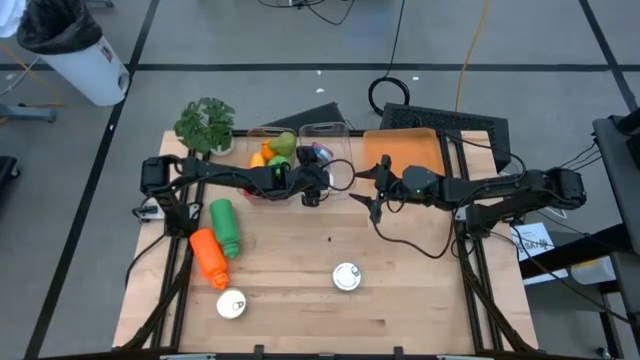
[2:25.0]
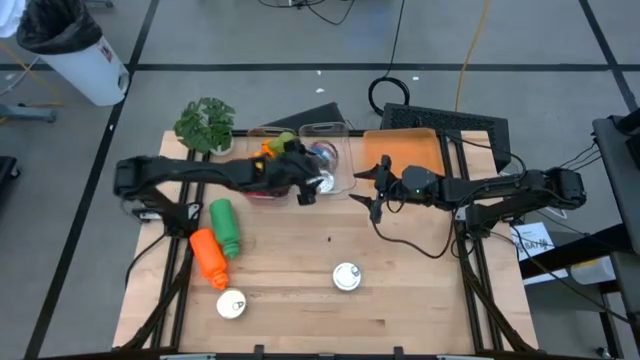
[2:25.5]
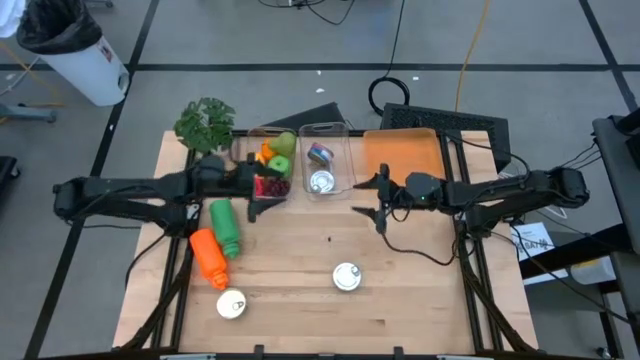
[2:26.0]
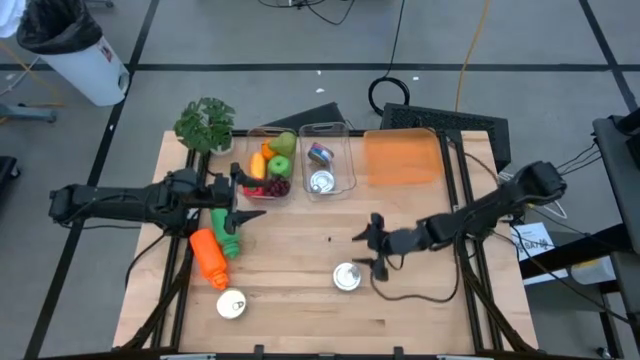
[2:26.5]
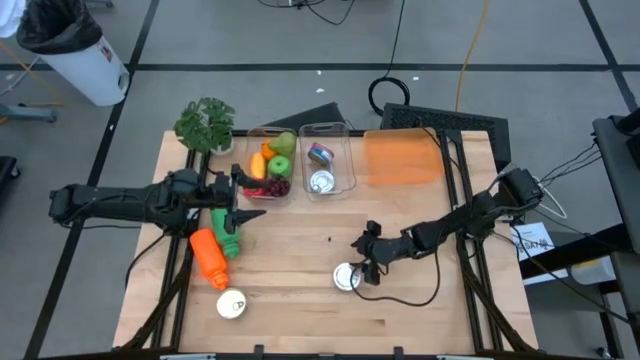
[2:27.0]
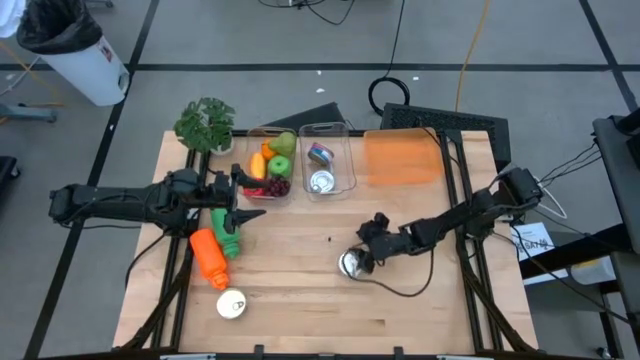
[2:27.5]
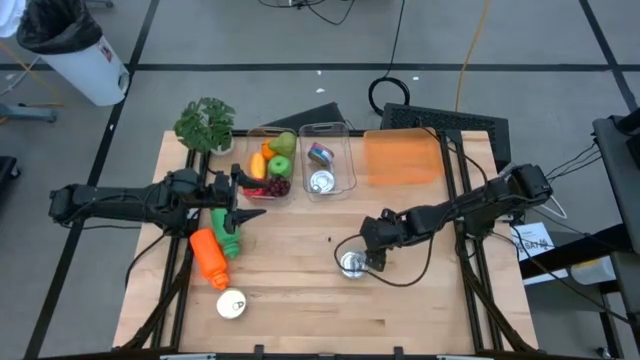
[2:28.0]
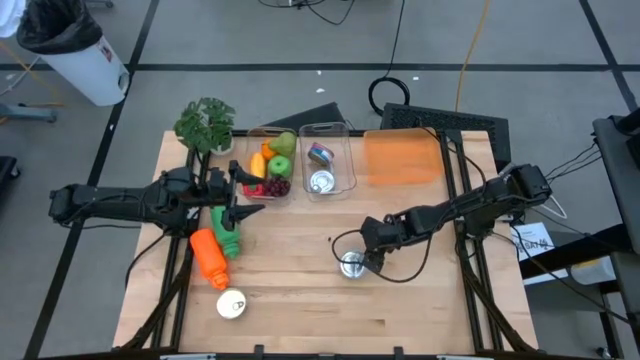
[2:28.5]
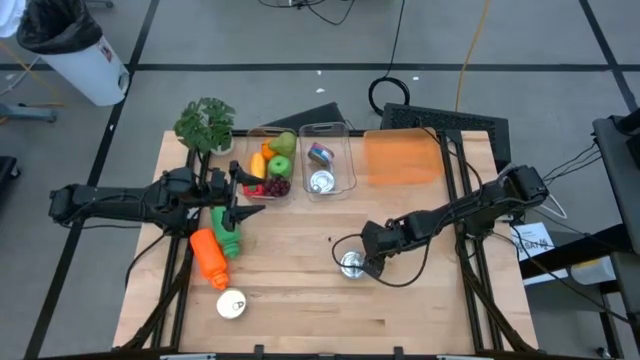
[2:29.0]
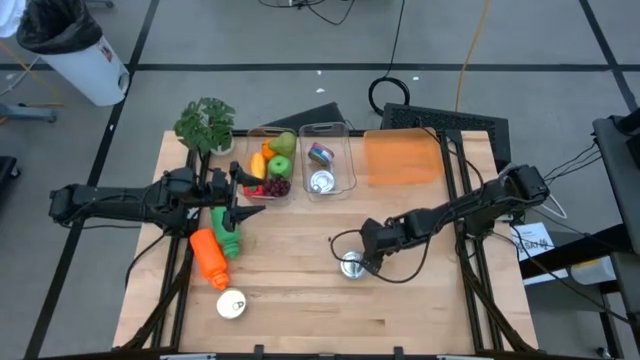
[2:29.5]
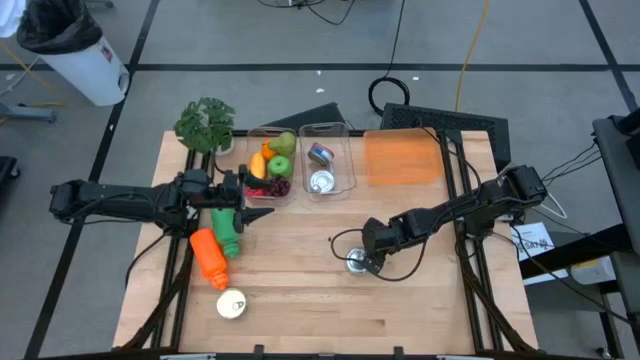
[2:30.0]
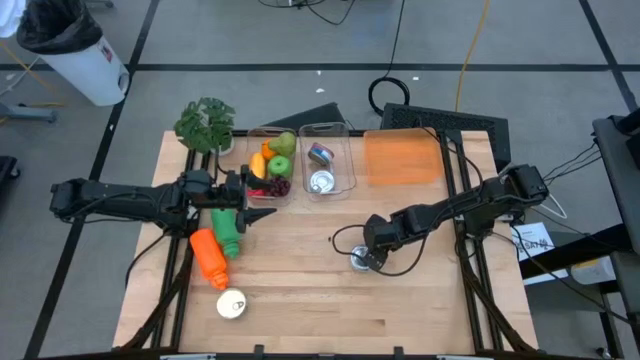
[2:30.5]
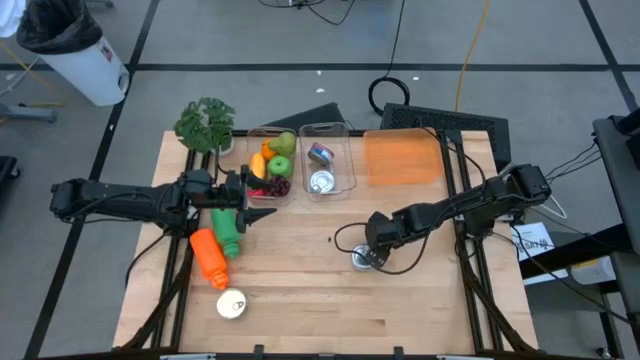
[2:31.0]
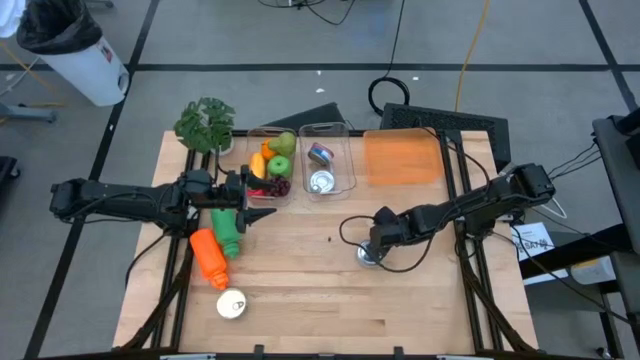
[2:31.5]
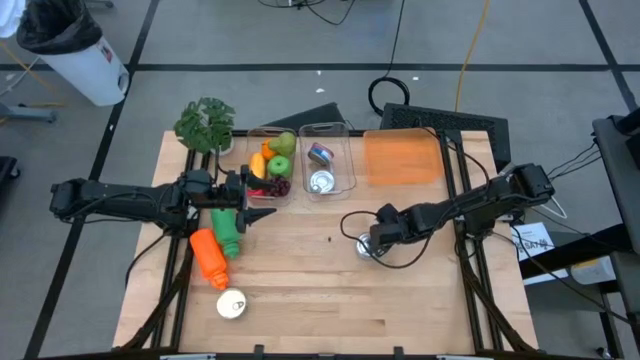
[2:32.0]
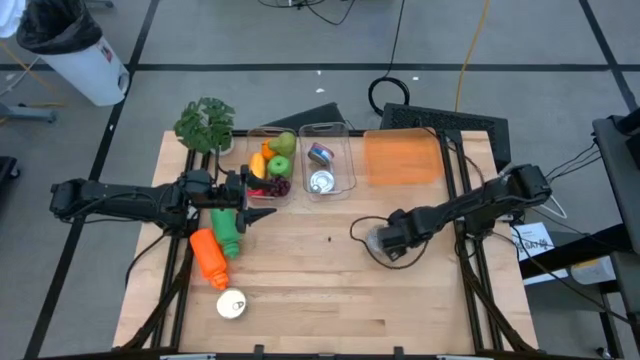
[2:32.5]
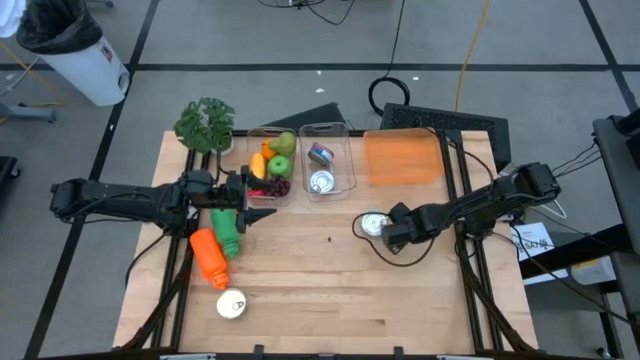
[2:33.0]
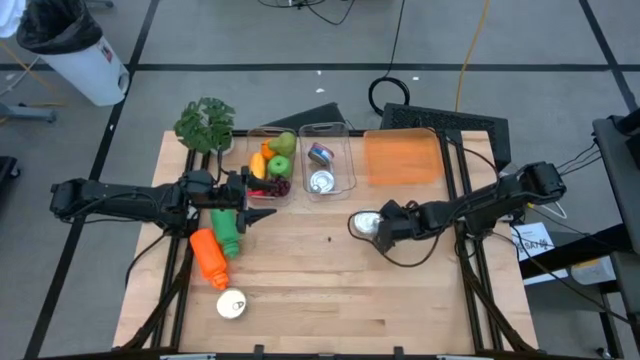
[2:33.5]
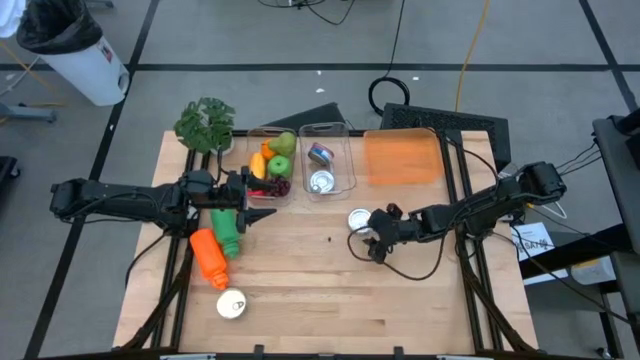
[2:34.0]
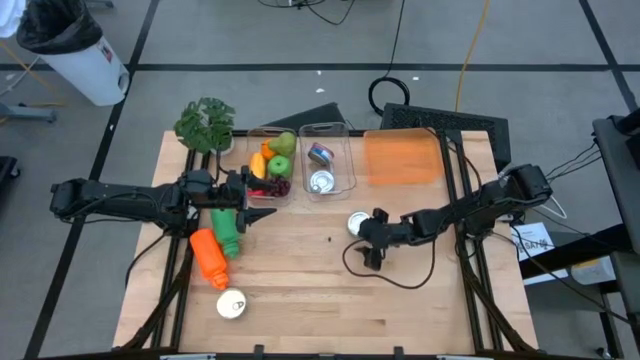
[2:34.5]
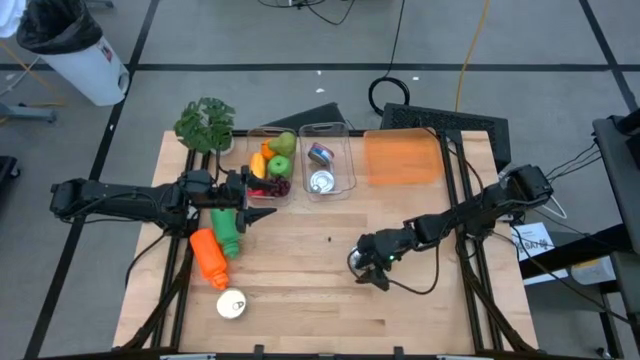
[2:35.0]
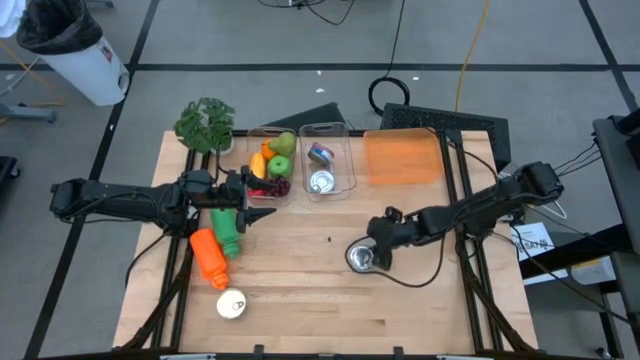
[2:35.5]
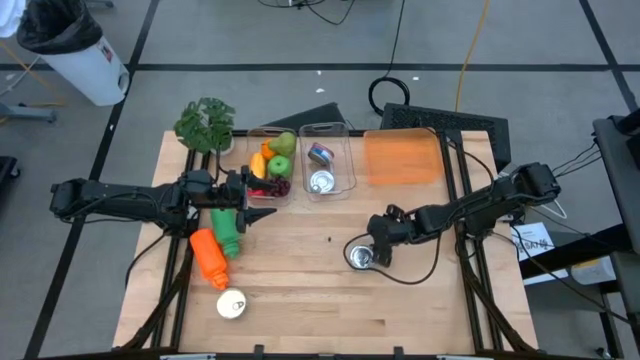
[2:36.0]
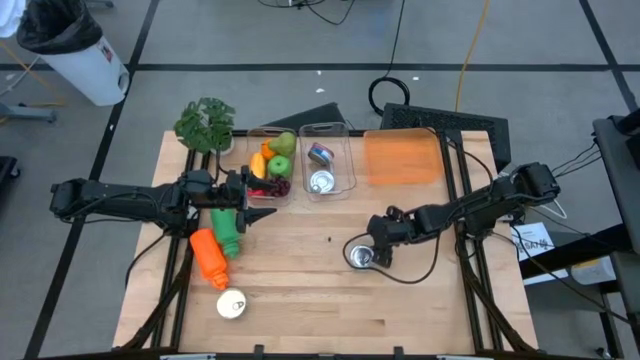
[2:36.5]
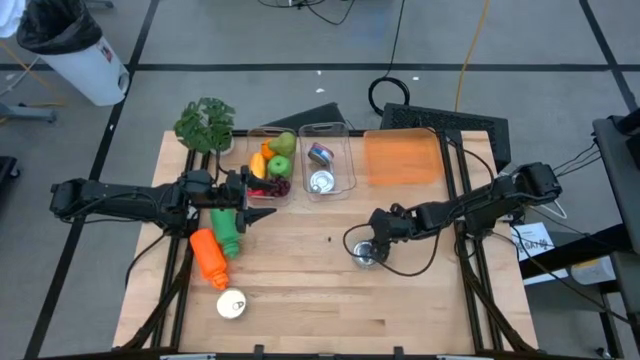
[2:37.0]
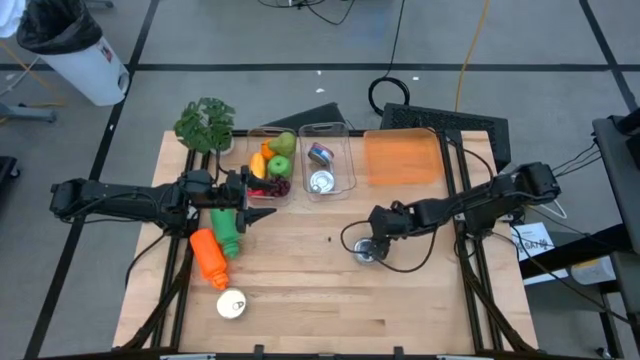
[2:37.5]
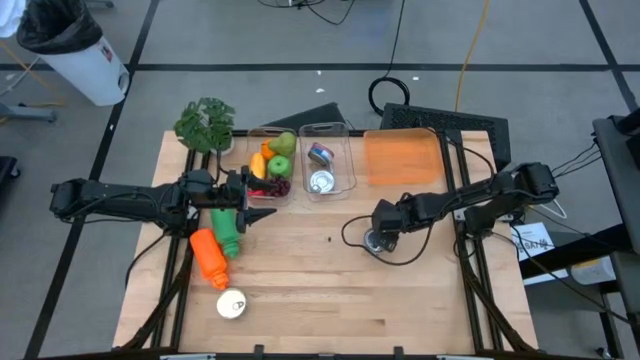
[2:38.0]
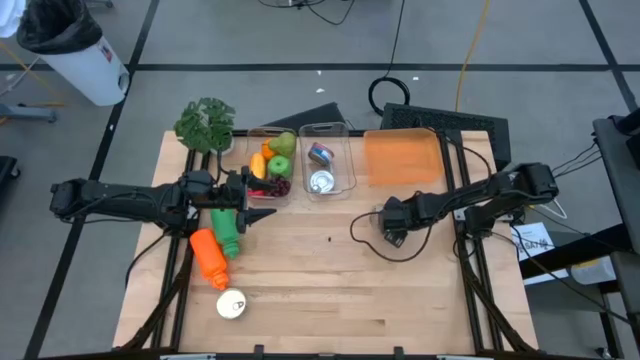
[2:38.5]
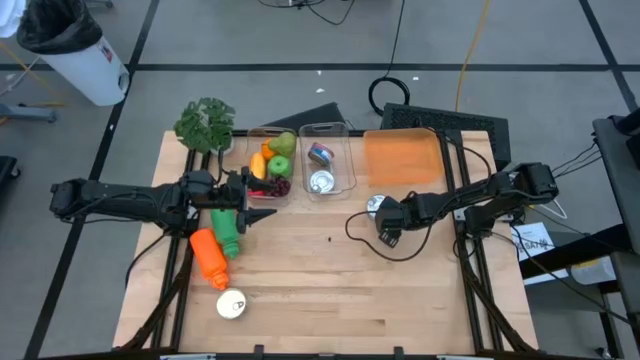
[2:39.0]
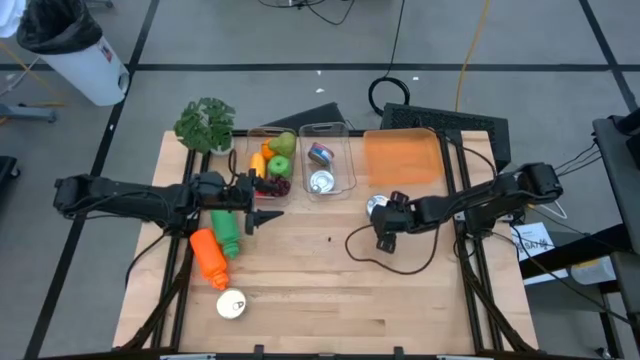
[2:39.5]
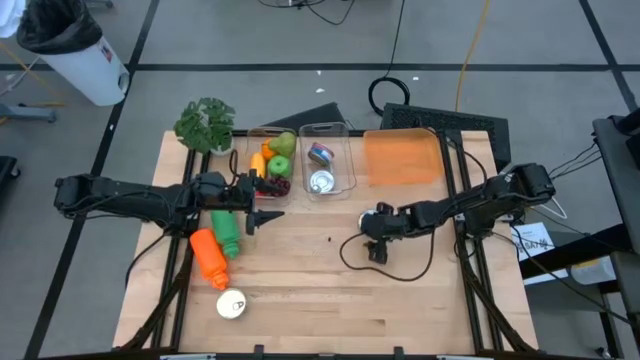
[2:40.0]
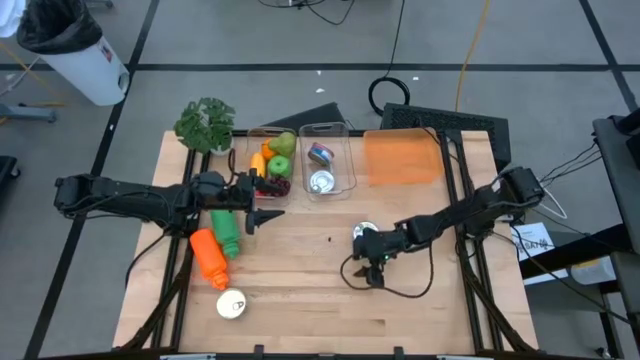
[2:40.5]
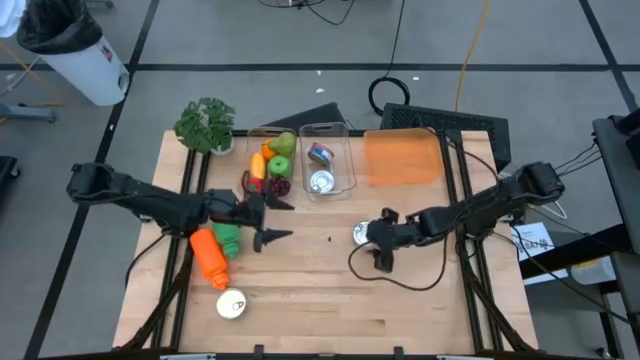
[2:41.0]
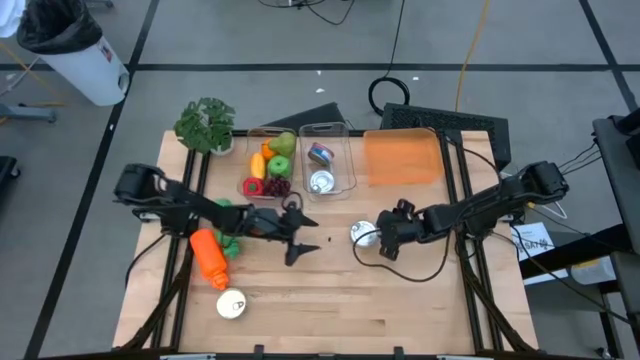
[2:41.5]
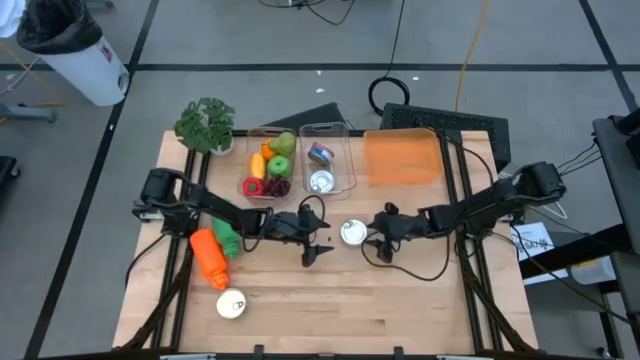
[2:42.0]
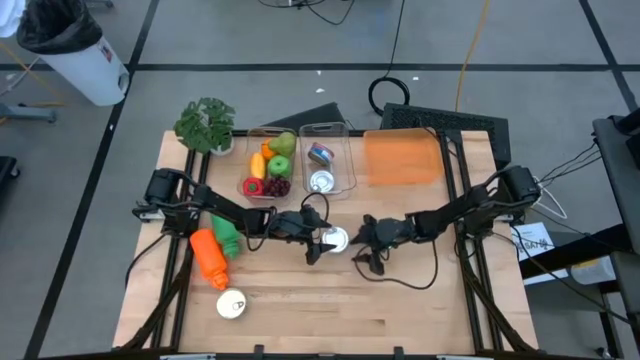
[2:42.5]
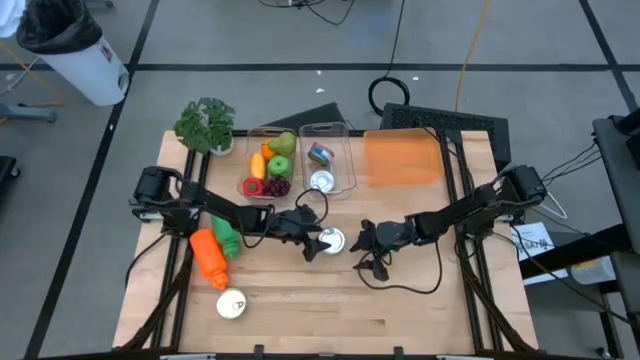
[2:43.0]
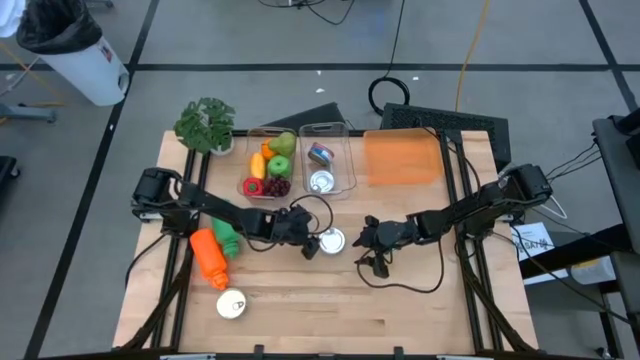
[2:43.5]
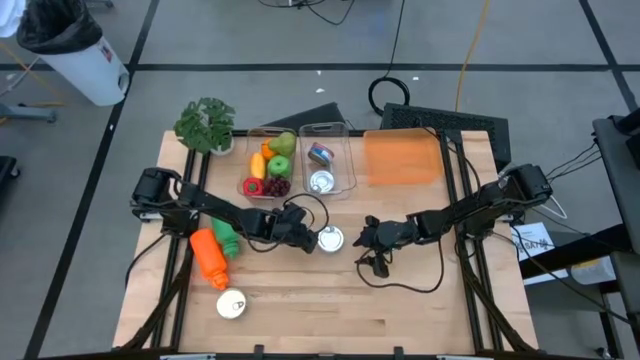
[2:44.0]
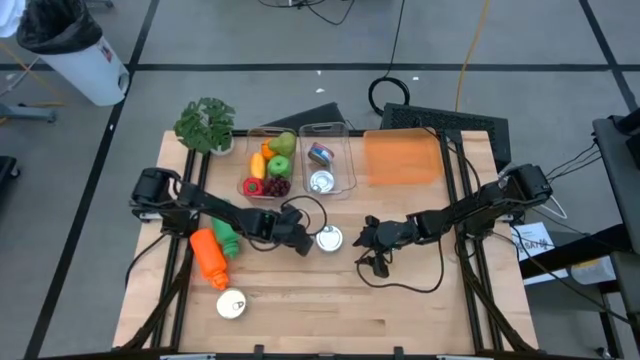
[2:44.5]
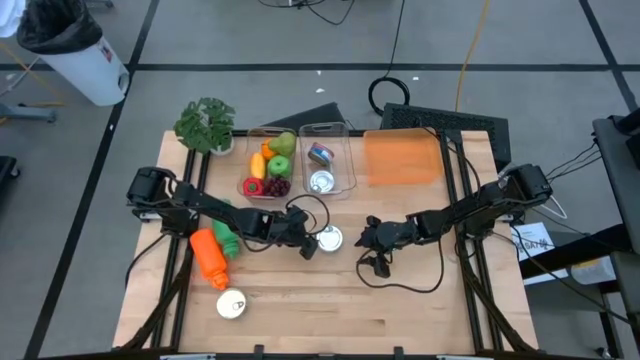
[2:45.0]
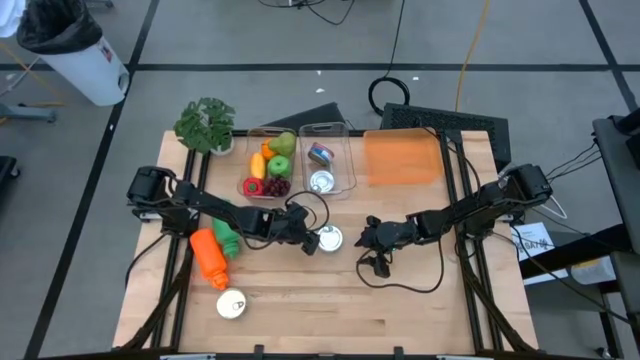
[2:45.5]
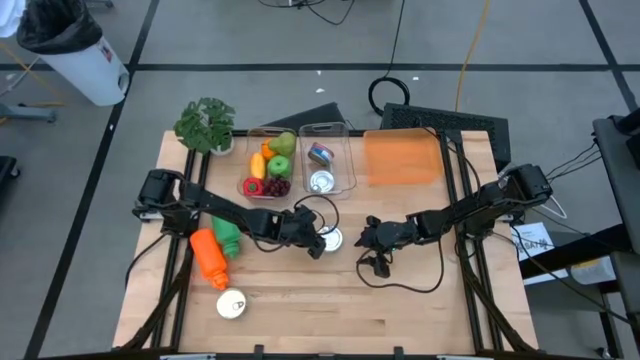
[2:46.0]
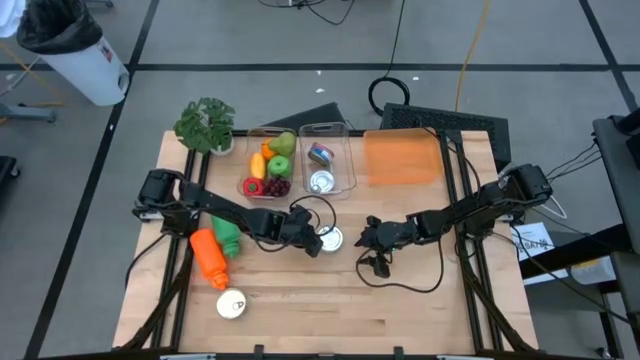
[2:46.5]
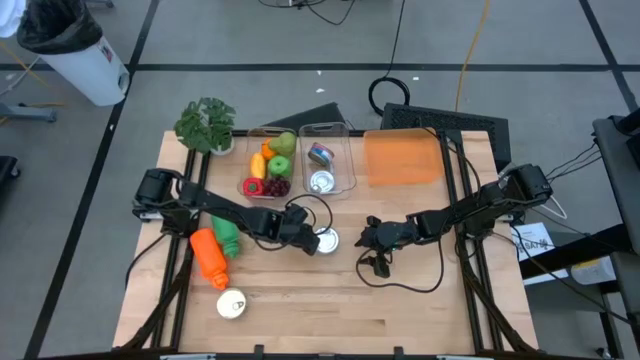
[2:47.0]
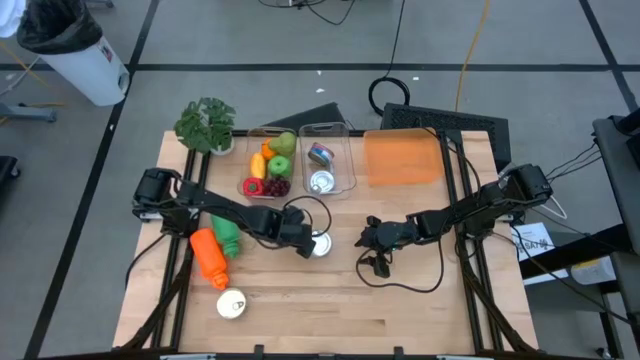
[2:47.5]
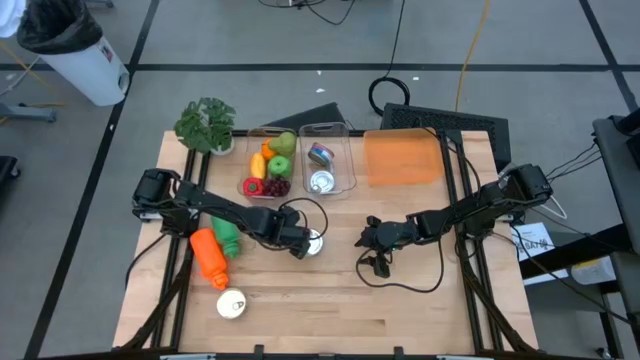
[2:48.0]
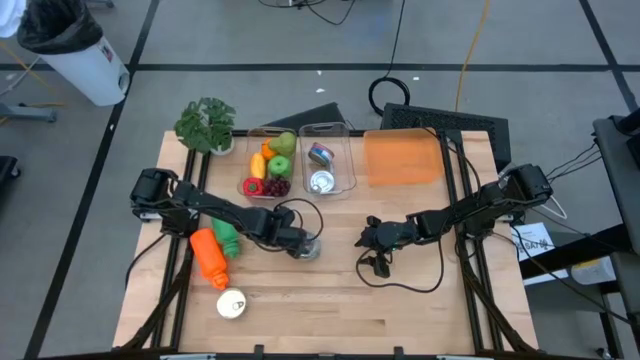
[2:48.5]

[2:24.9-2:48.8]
Task: Pick & Place Food Item
Put the green tuna can into the right transparent bin
